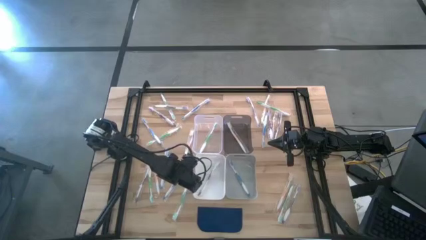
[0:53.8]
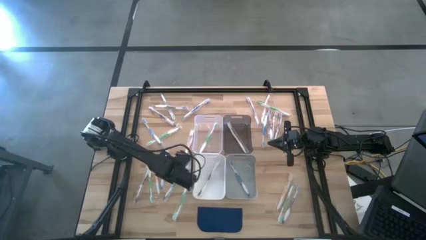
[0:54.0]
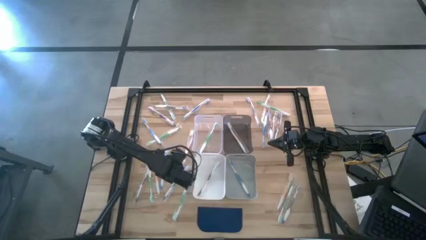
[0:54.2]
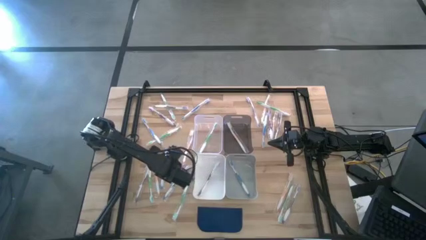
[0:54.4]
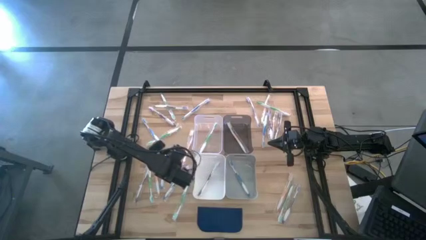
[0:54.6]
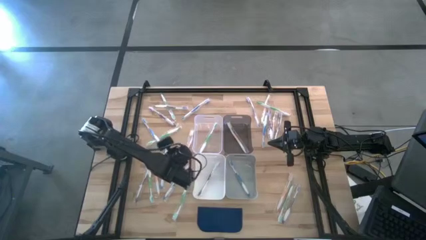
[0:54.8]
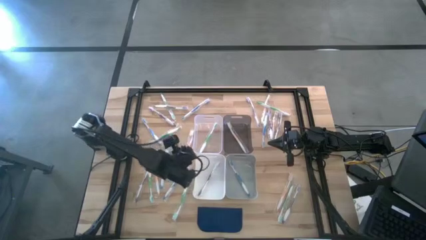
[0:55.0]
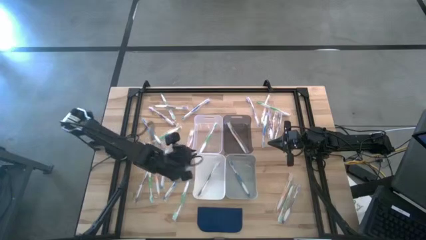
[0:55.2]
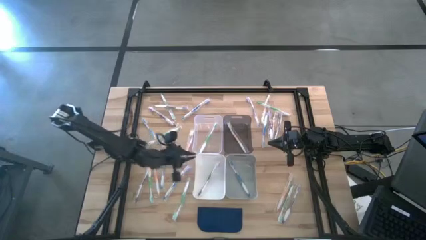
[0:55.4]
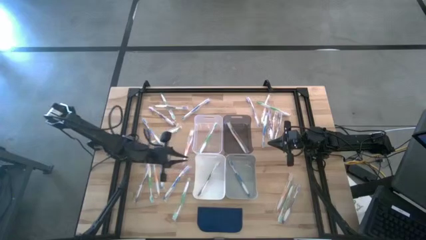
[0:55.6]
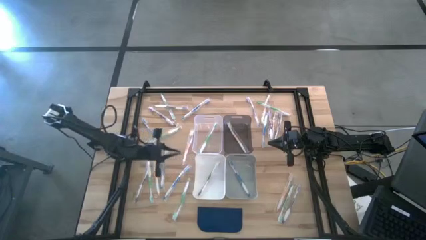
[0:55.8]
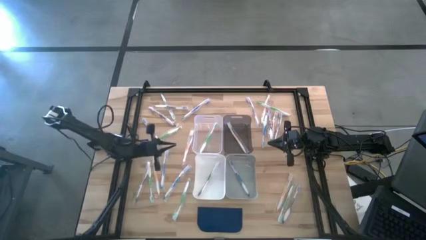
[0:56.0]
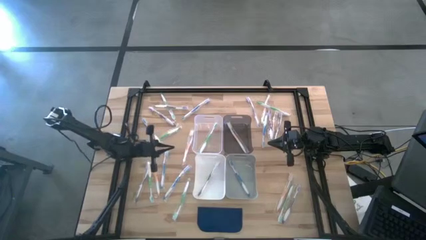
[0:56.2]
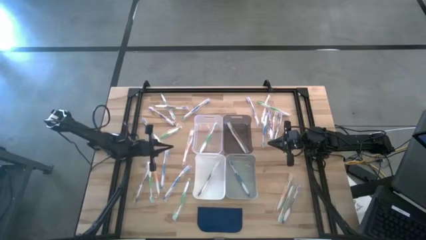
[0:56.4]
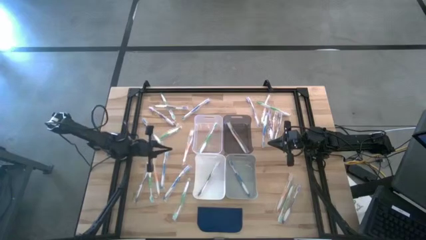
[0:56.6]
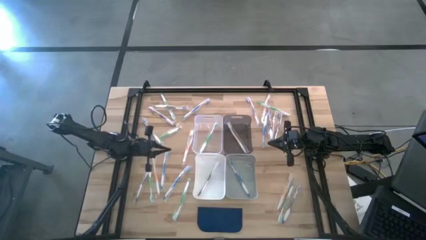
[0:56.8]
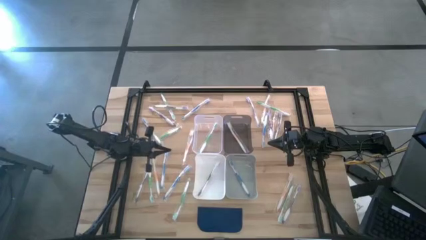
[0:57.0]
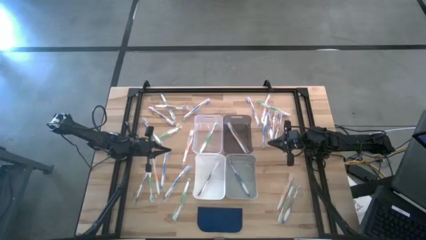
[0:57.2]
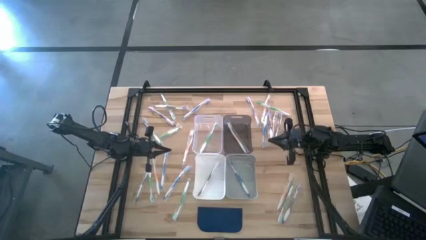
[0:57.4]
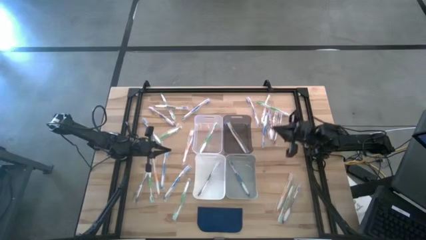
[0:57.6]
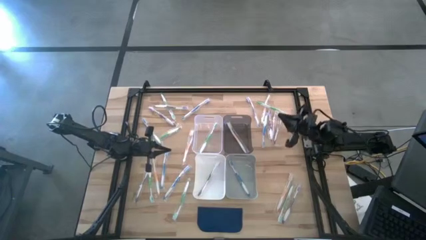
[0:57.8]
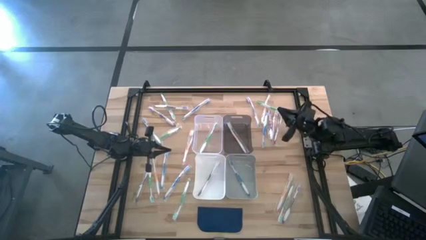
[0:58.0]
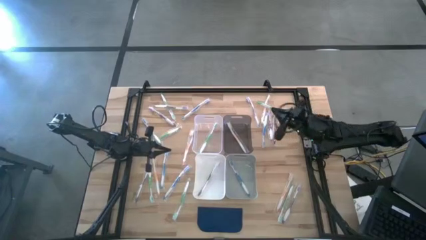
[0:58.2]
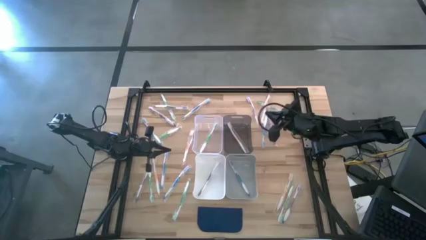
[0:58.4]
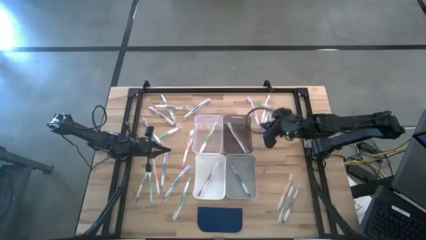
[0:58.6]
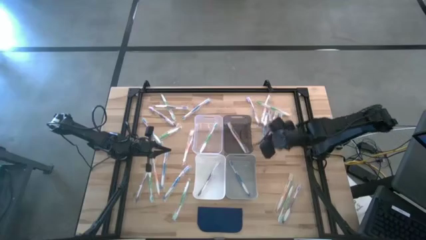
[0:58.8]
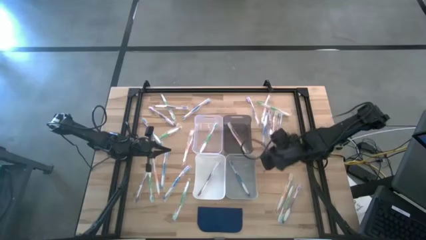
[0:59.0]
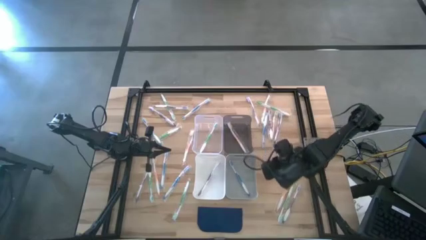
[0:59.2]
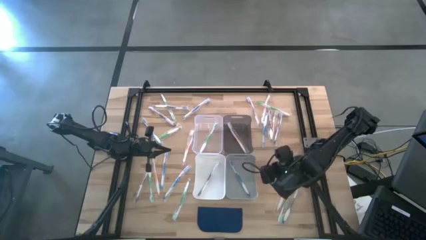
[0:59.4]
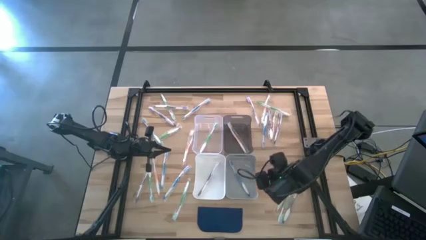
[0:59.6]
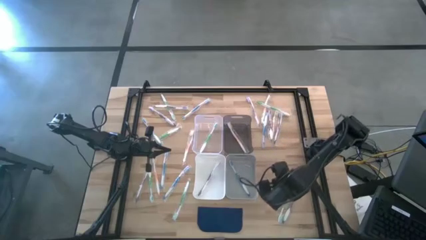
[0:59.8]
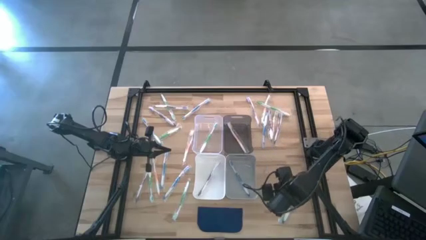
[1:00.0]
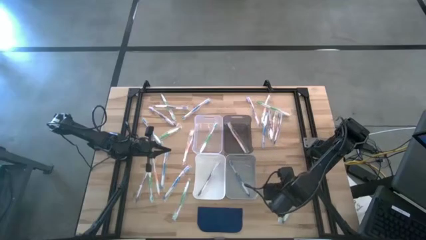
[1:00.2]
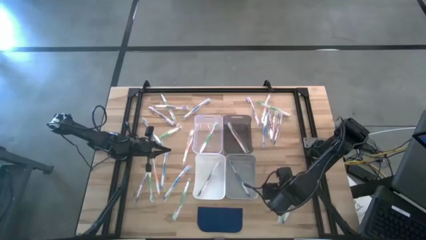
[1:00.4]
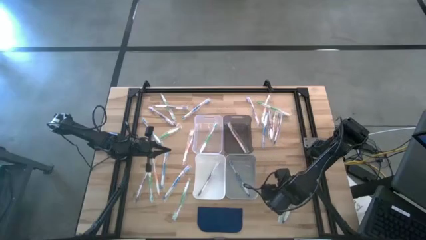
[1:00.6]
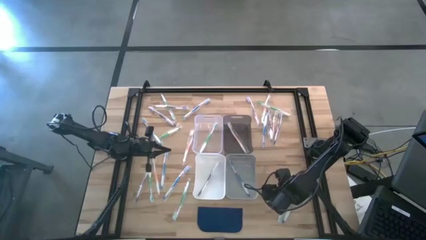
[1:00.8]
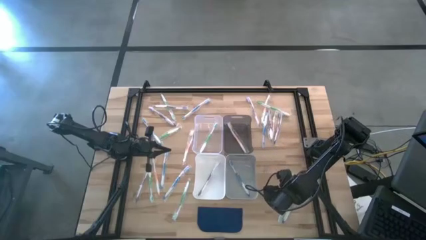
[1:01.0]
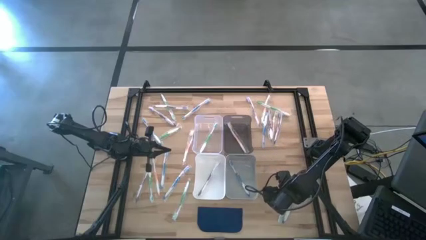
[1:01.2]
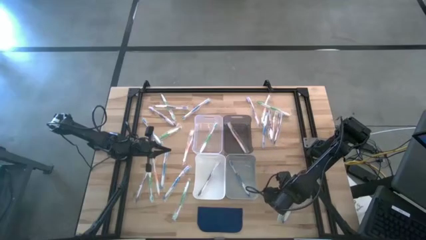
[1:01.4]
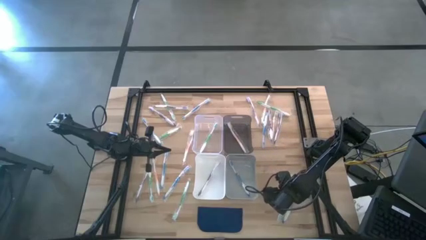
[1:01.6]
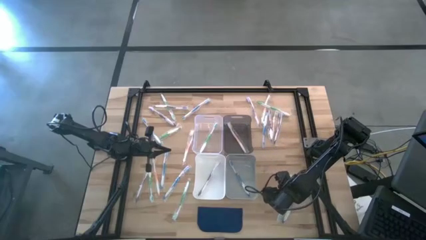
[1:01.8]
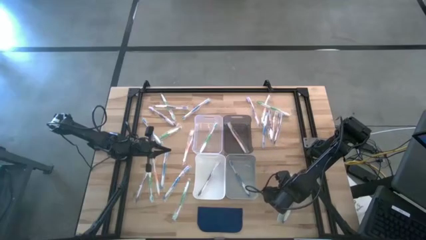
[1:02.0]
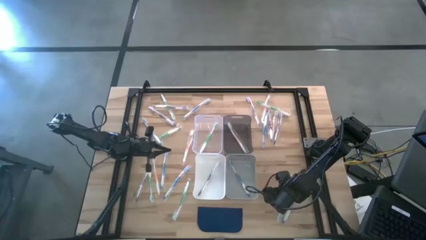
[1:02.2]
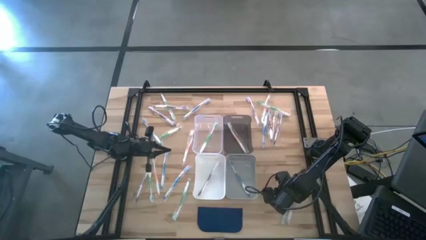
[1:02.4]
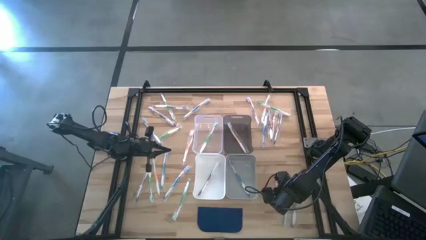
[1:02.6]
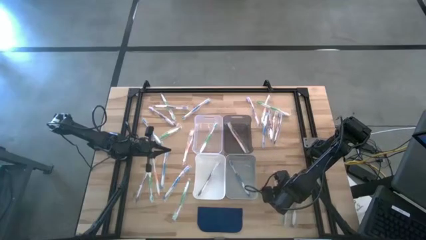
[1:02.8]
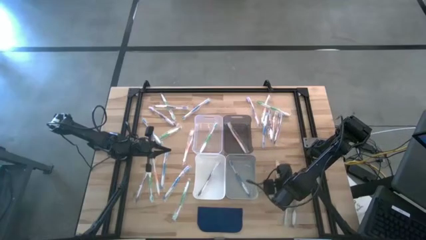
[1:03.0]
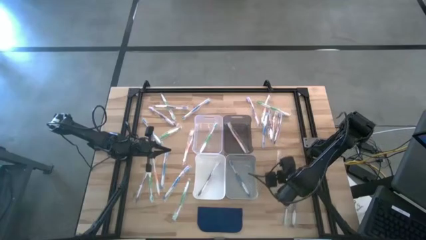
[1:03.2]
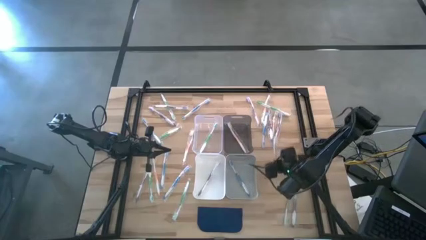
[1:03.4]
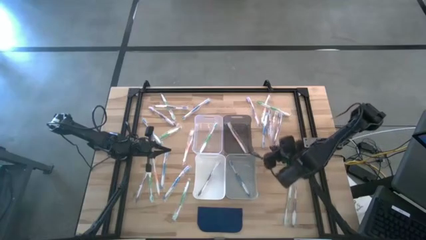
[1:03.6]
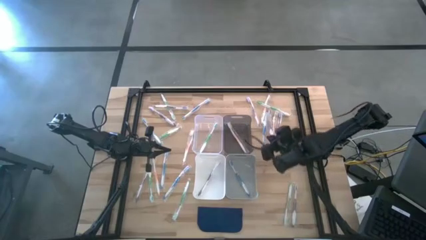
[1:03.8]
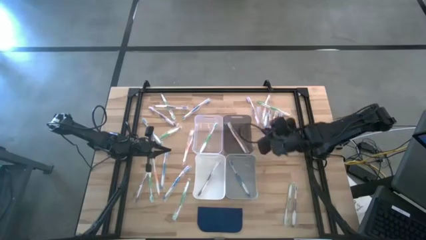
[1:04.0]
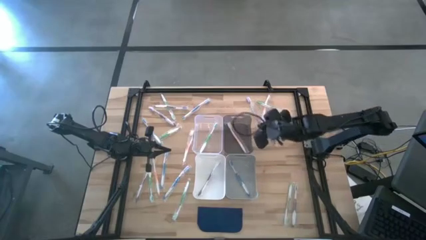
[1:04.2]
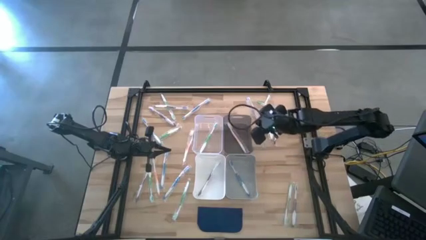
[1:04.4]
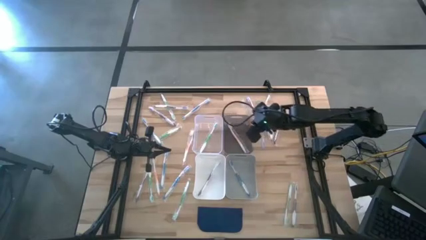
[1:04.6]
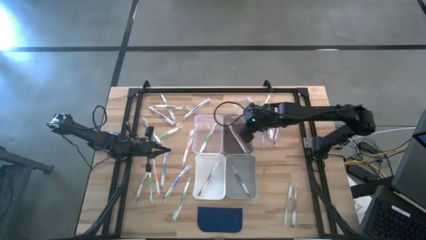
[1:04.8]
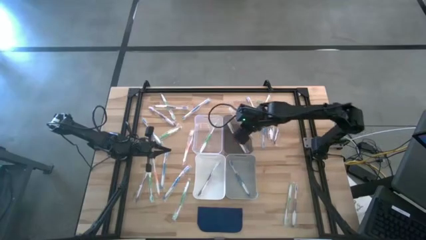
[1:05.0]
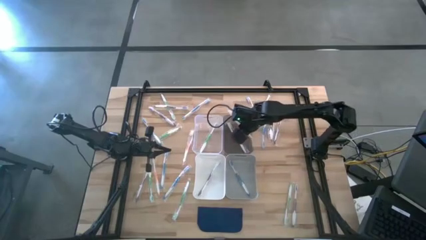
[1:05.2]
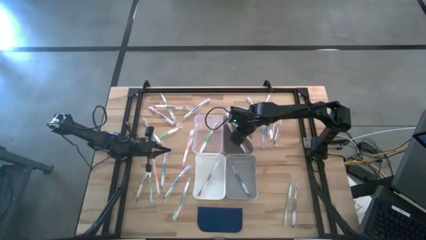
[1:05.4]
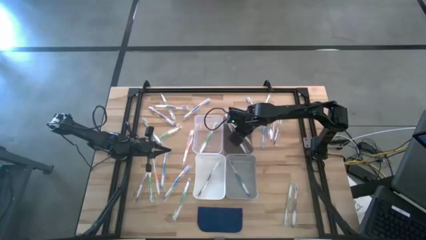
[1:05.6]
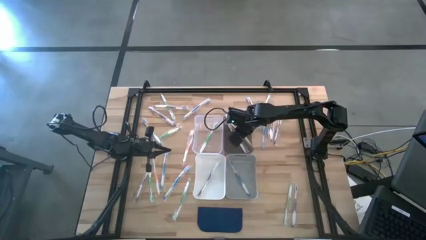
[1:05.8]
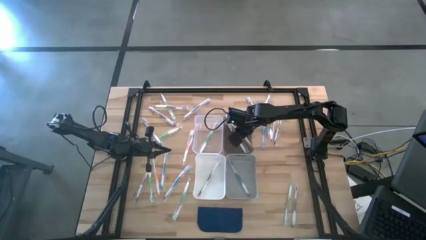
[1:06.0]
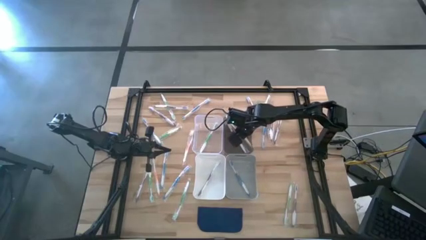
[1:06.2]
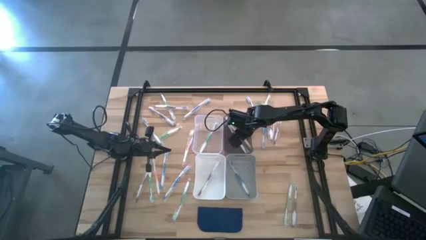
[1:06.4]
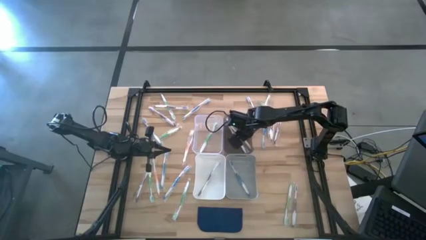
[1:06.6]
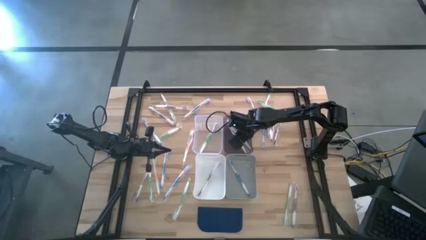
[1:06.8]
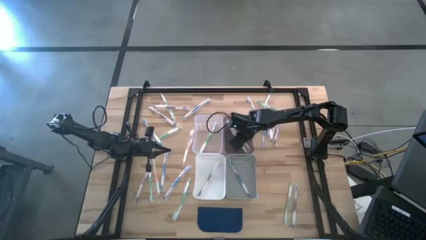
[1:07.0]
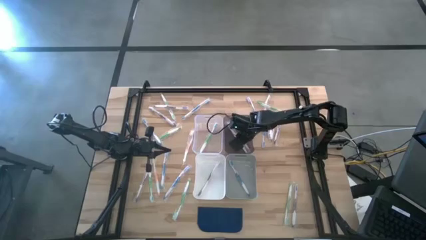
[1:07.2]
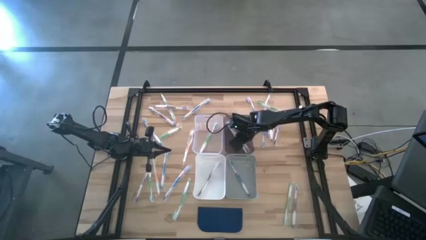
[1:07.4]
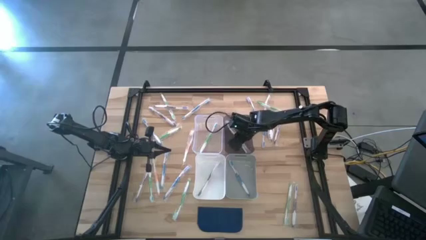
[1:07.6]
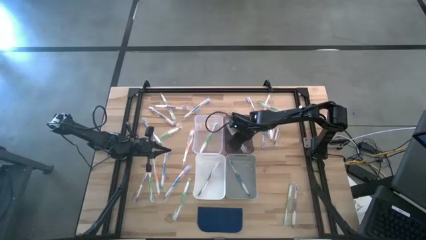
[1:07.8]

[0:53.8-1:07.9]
Task: Pick & Place Toothbrushes
Put the orange toothbrush into the black bin

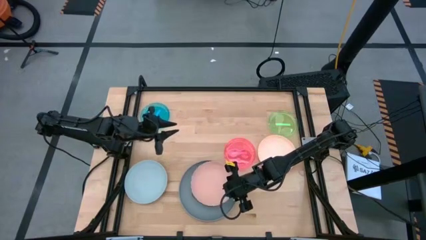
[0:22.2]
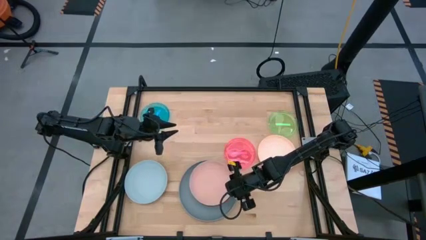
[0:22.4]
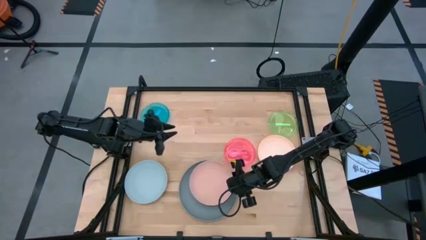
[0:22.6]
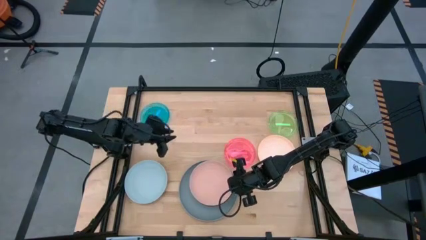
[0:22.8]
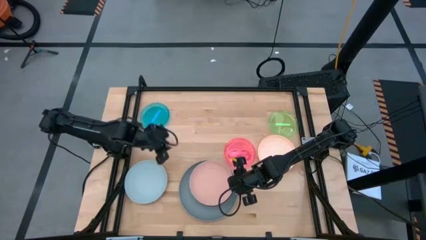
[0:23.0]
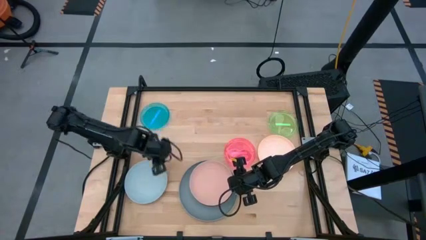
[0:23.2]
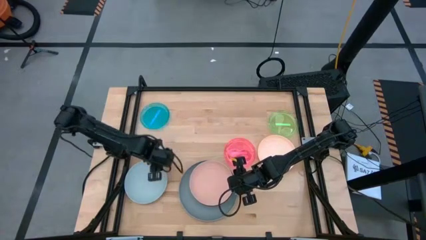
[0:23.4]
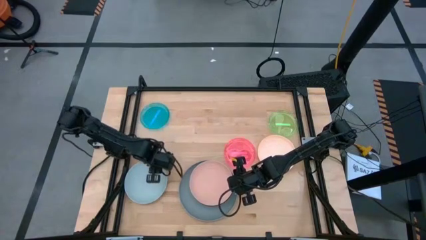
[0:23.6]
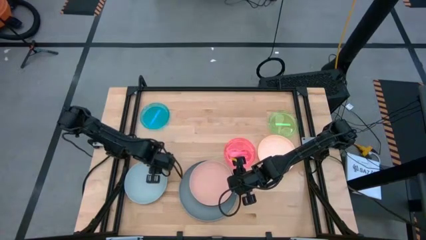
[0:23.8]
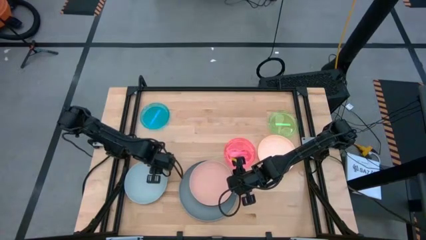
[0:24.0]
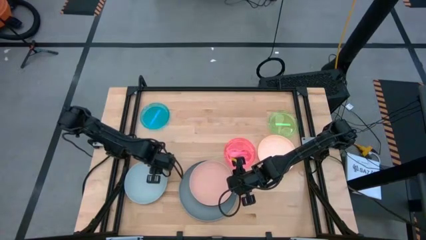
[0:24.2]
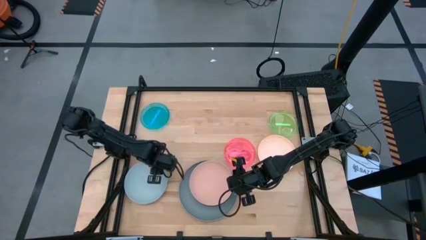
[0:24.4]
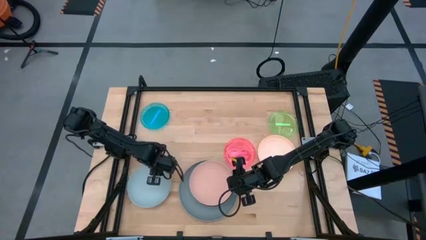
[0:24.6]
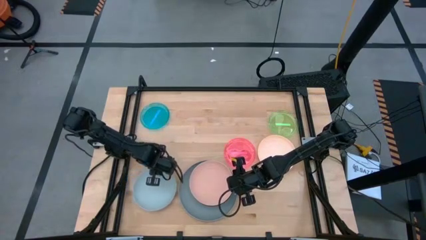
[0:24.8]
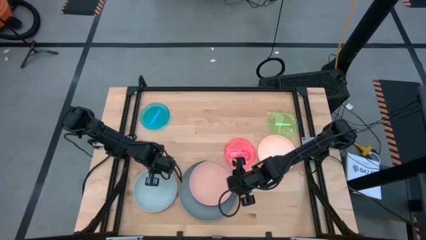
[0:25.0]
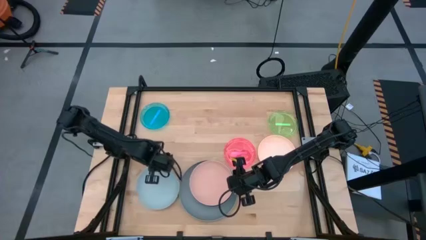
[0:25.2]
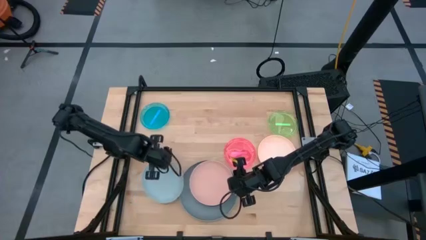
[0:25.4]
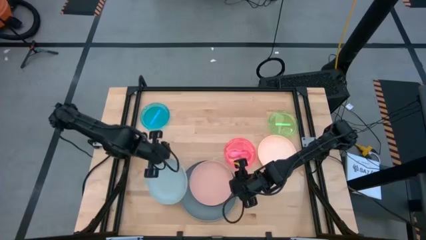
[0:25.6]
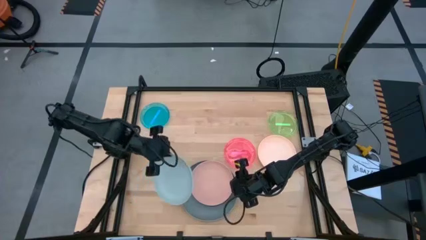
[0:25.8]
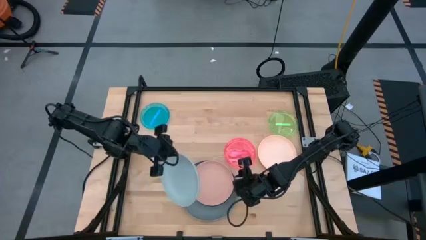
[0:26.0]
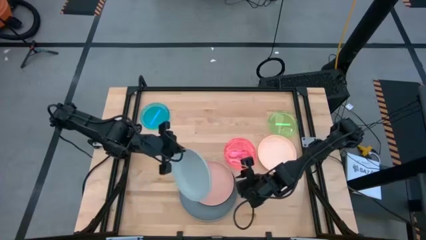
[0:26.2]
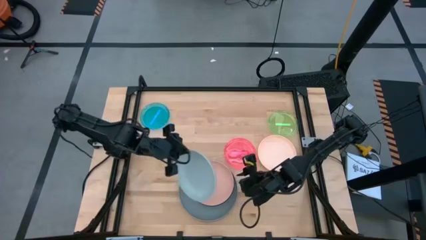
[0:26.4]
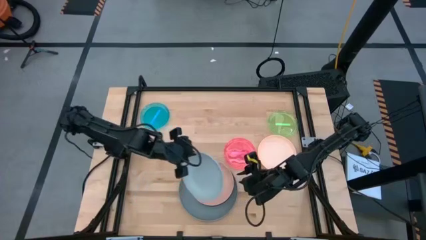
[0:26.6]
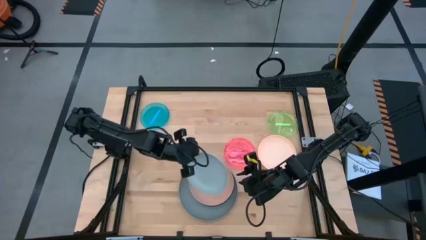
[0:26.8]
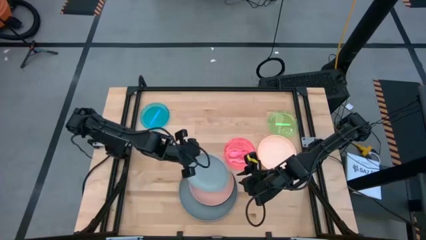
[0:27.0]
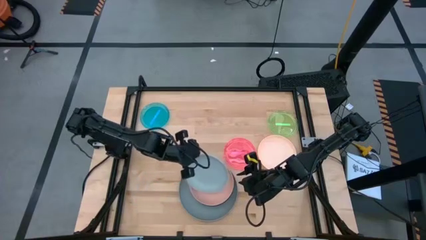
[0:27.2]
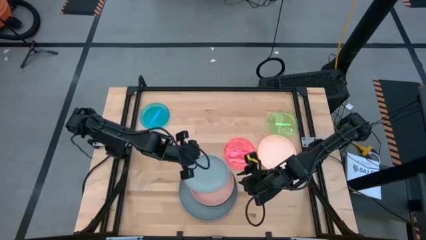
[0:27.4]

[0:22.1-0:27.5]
Task: Stack plastic plates
Stack the light blue plate on top of the pink plate
